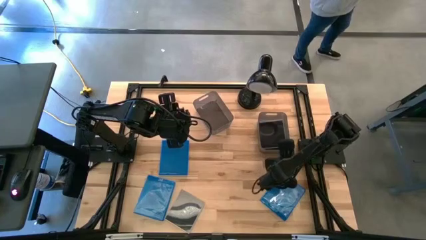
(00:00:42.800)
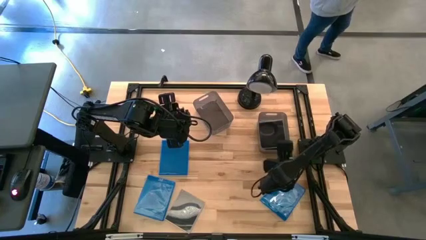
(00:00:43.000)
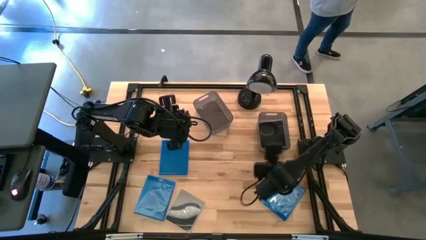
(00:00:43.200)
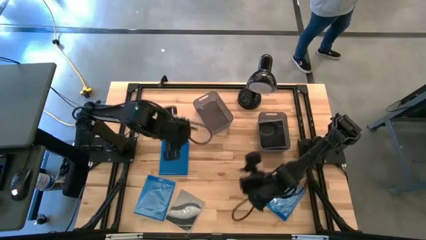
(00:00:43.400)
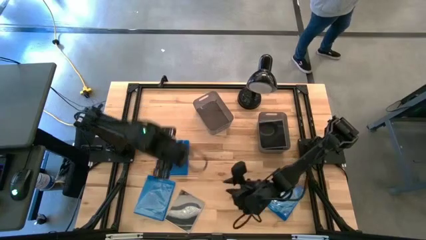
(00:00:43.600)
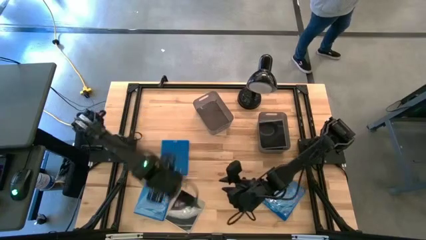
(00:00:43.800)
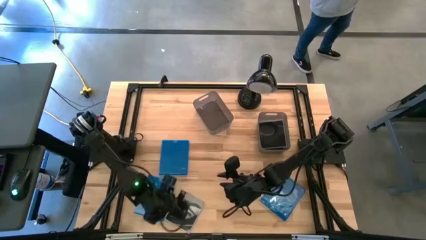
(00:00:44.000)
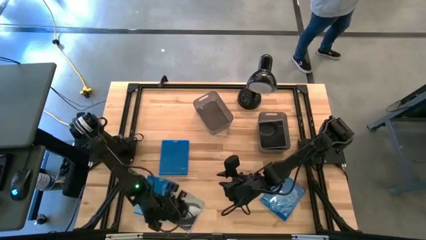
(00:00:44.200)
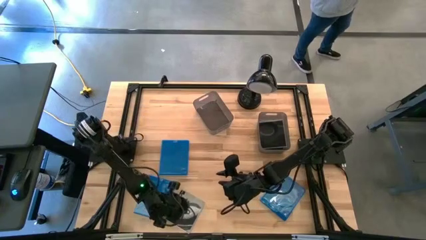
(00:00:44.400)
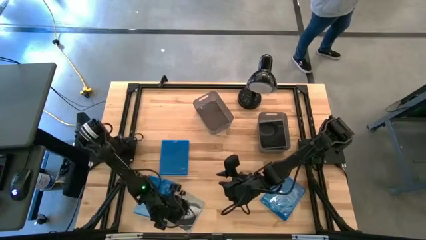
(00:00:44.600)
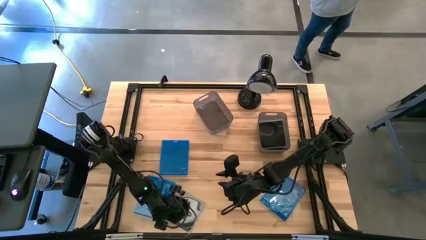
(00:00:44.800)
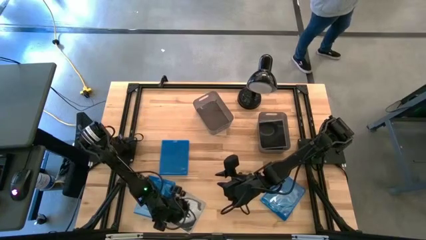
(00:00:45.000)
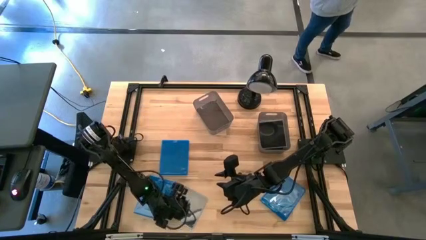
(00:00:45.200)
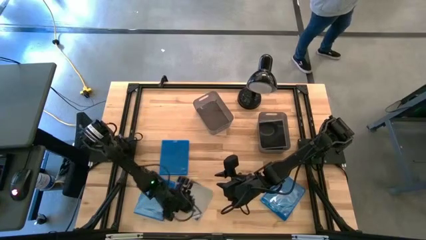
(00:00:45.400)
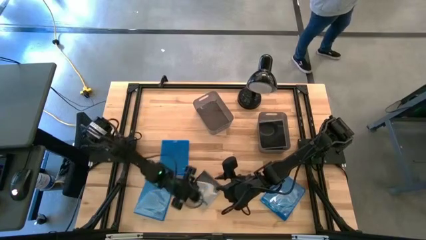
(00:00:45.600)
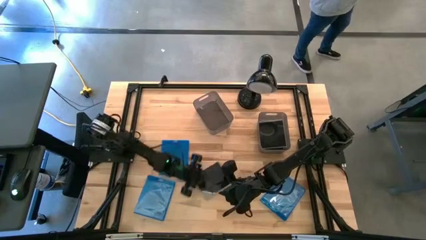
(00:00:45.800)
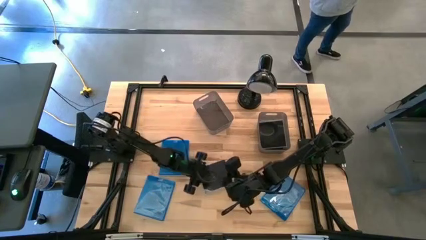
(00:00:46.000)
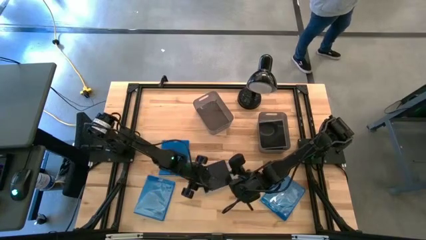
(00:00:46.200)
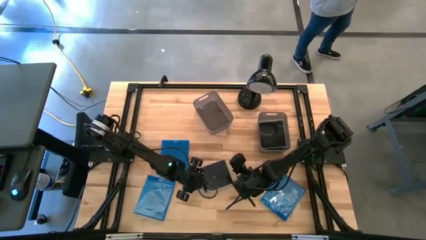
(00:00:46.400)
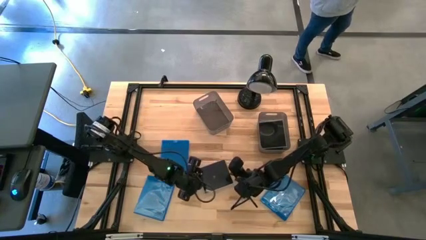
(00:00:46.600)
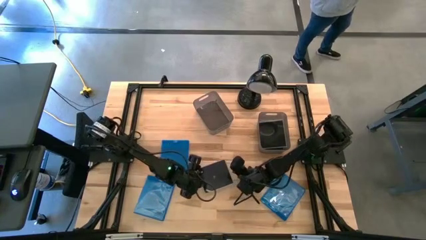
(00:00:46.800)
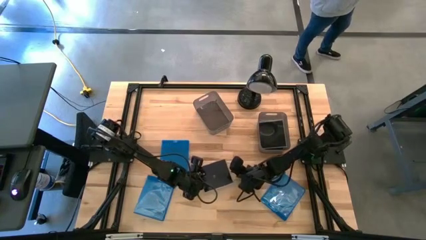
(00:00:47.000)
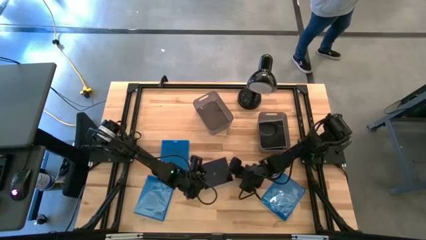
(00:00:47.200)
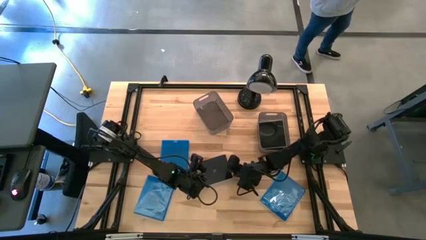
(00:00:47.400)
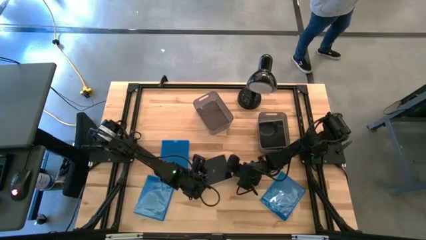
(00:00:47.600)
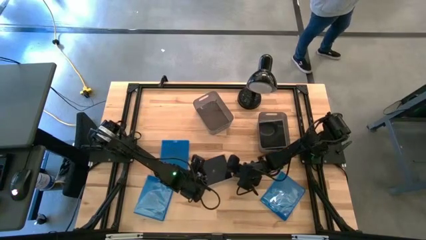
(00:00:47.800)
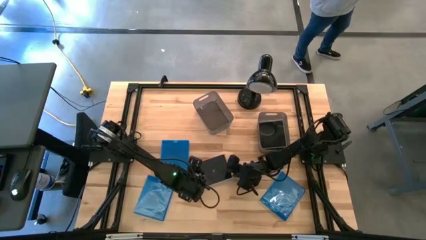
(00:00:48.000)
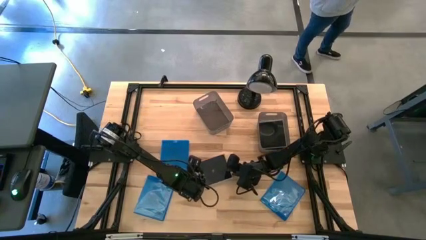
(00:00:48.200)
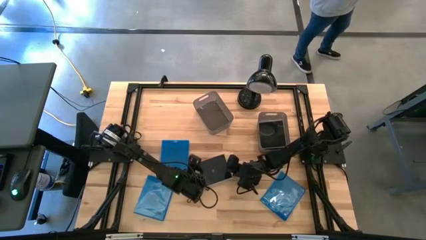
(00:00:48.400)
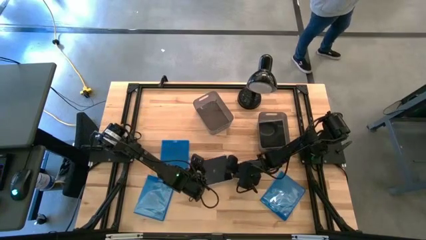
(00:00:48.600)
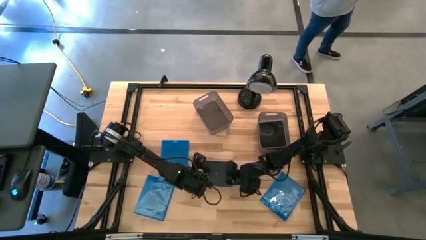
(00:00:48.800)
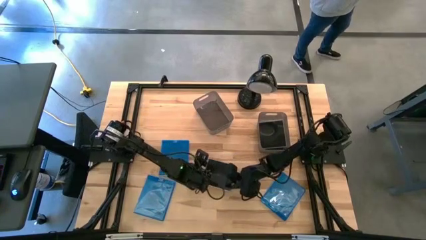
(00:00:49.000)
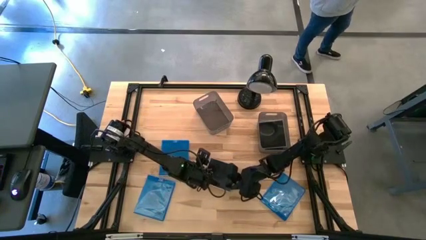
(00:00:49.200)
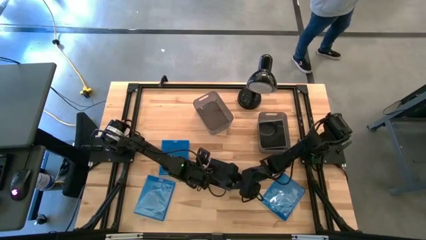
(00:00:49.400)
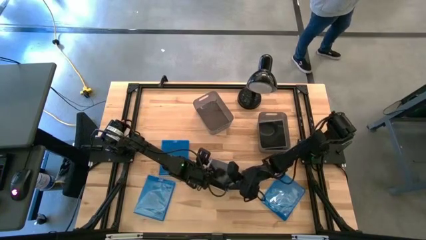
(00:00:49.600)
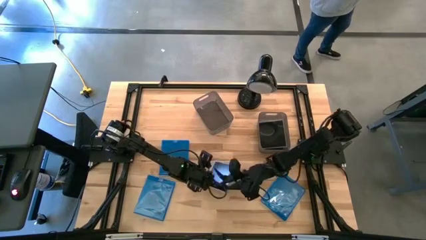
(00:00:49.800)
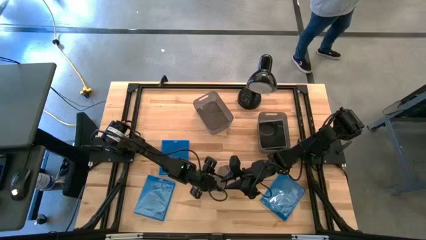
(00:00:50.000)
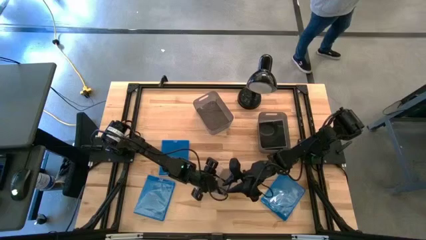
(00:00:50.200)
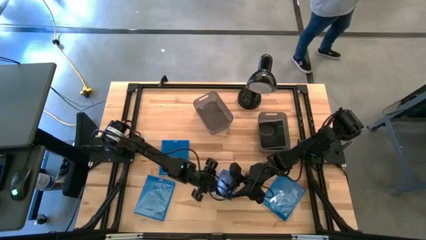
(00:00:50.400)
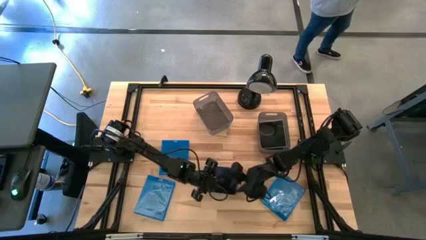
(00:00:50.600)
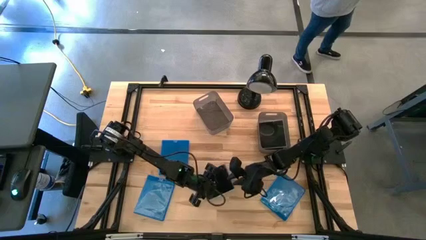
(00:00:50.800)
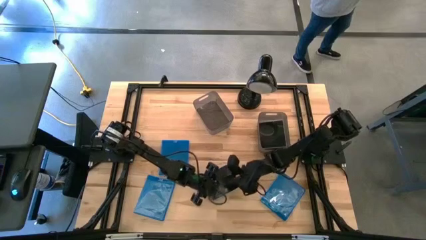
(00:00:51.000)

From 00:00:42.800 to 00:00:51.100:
Task: Pick & place jewel cases by type
Put the black CD case into the right black bin

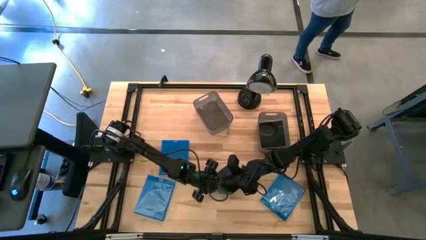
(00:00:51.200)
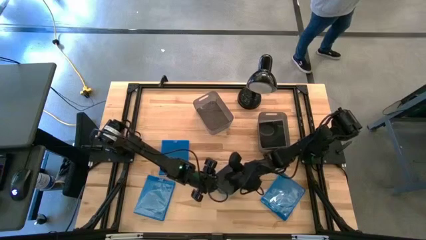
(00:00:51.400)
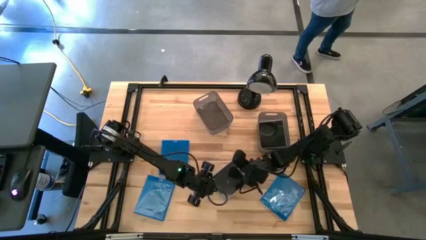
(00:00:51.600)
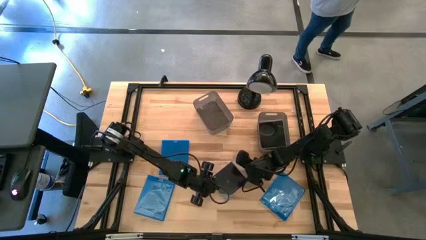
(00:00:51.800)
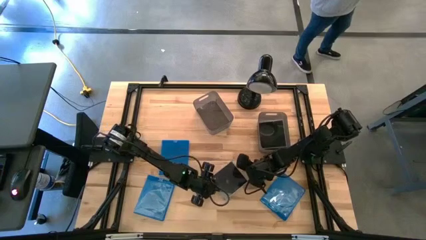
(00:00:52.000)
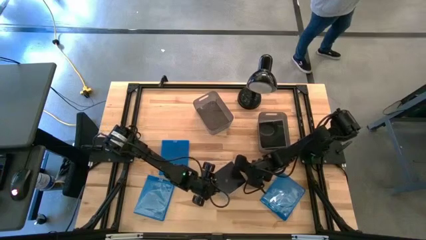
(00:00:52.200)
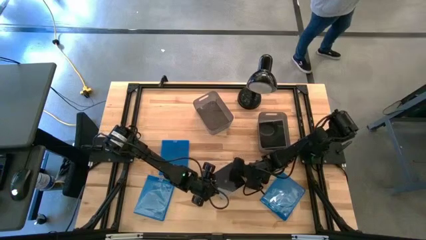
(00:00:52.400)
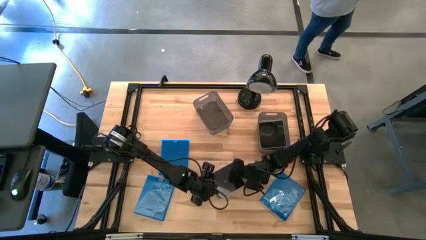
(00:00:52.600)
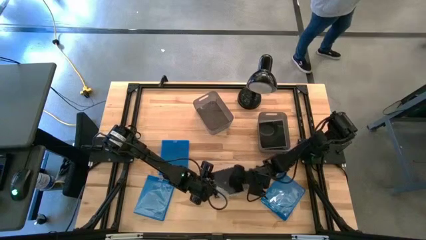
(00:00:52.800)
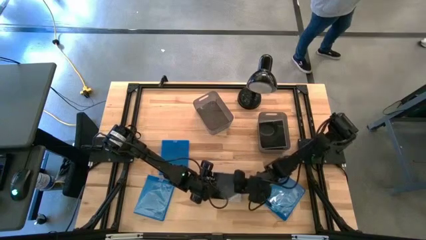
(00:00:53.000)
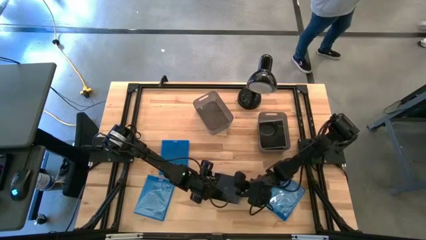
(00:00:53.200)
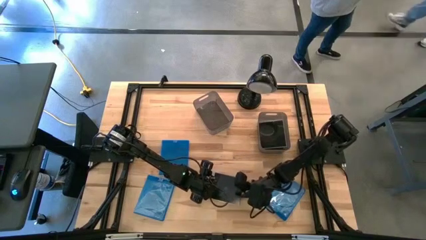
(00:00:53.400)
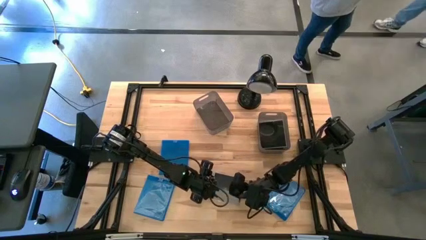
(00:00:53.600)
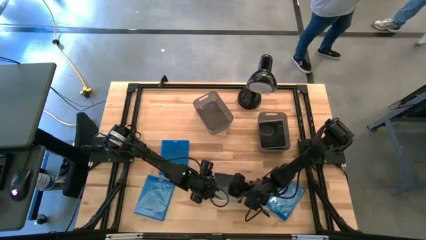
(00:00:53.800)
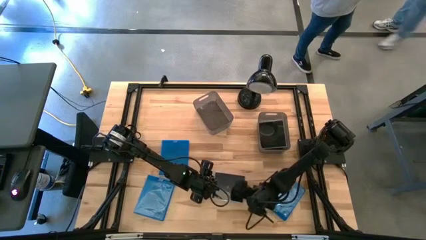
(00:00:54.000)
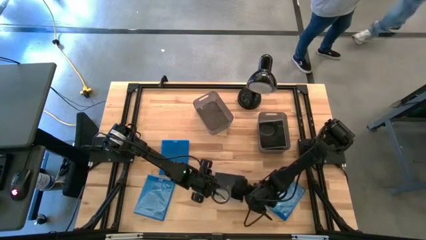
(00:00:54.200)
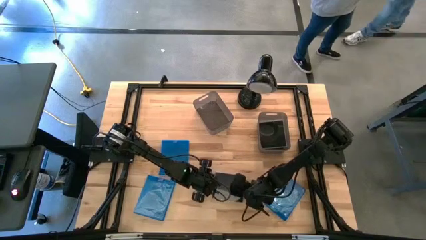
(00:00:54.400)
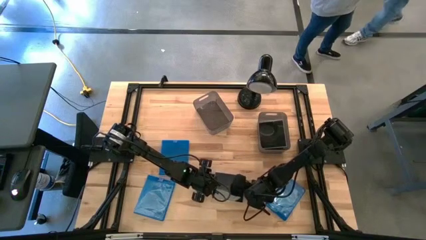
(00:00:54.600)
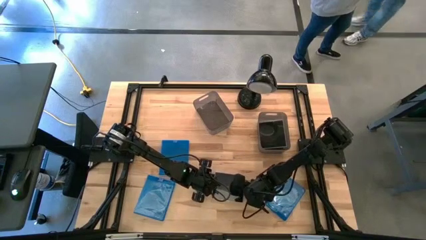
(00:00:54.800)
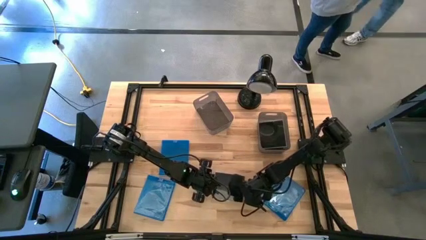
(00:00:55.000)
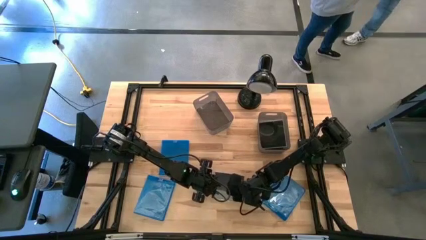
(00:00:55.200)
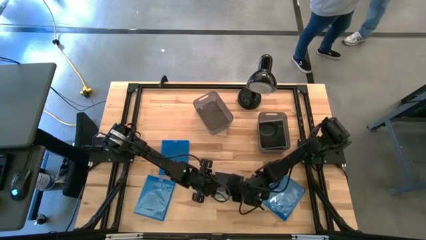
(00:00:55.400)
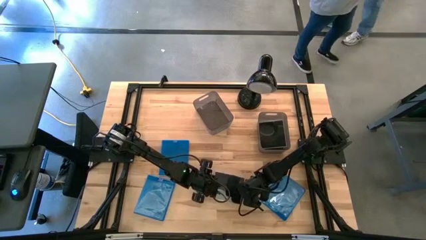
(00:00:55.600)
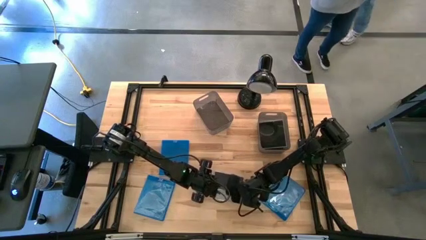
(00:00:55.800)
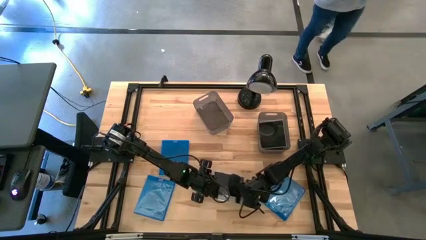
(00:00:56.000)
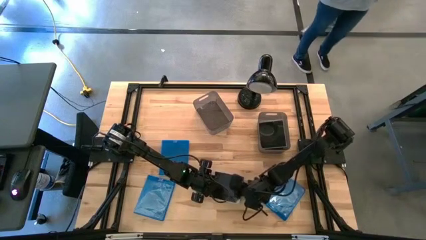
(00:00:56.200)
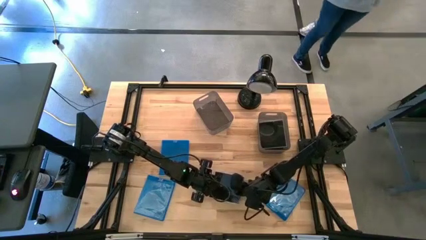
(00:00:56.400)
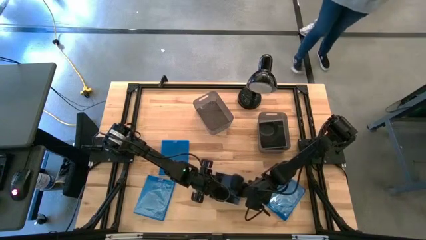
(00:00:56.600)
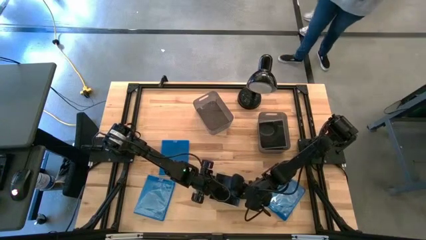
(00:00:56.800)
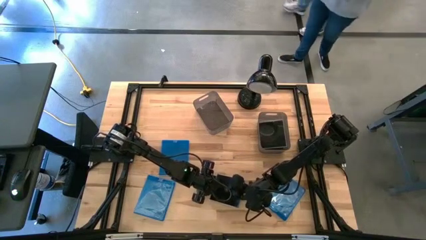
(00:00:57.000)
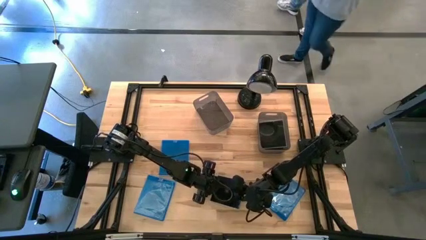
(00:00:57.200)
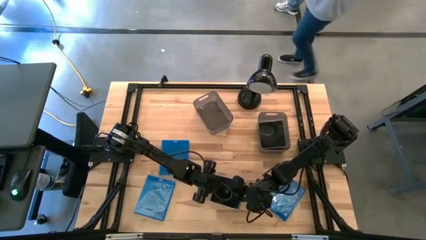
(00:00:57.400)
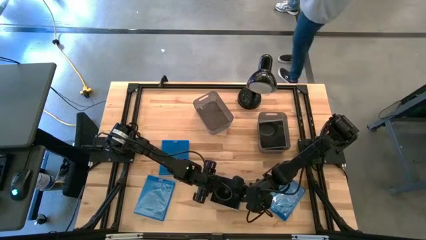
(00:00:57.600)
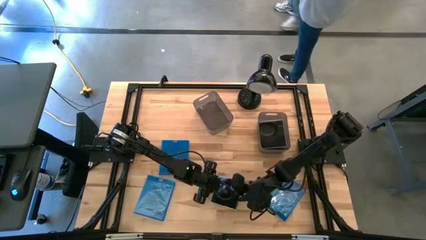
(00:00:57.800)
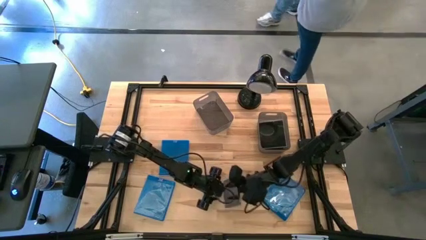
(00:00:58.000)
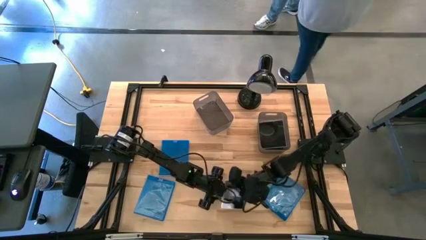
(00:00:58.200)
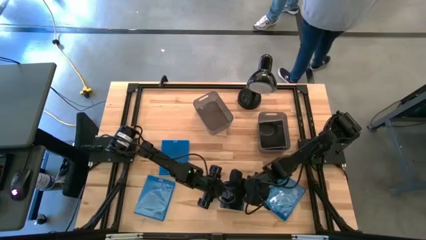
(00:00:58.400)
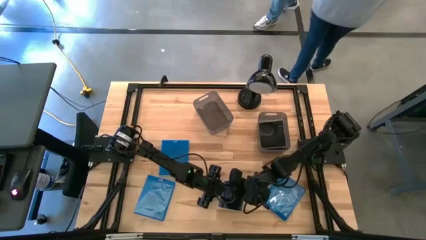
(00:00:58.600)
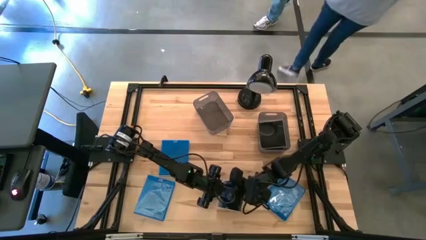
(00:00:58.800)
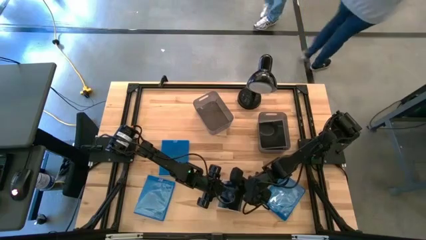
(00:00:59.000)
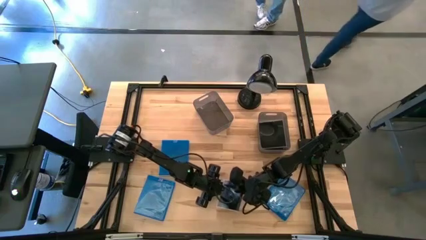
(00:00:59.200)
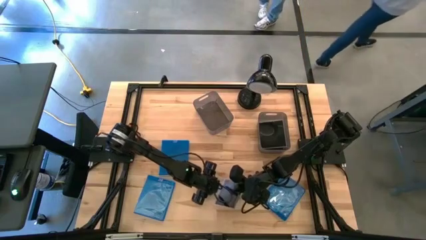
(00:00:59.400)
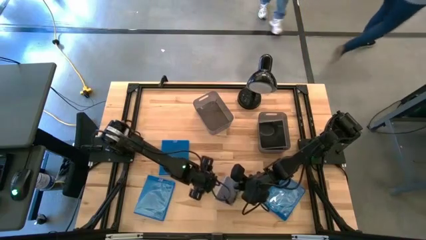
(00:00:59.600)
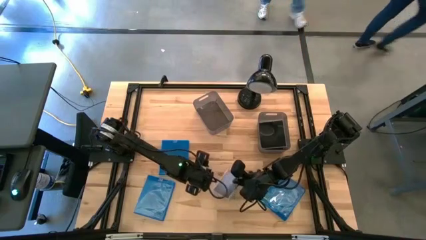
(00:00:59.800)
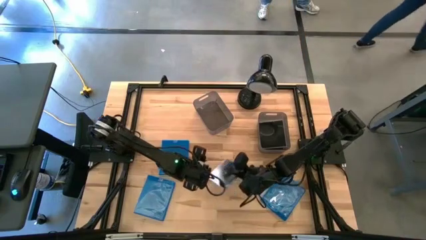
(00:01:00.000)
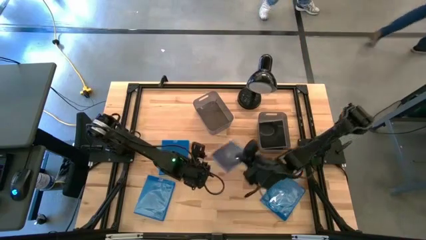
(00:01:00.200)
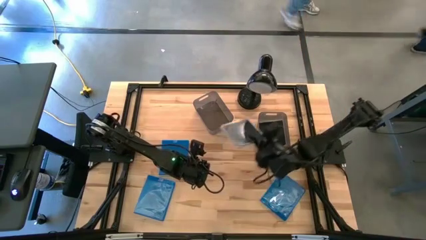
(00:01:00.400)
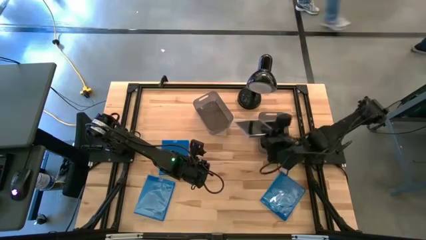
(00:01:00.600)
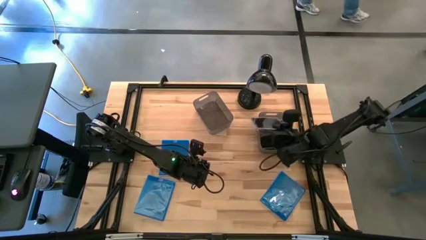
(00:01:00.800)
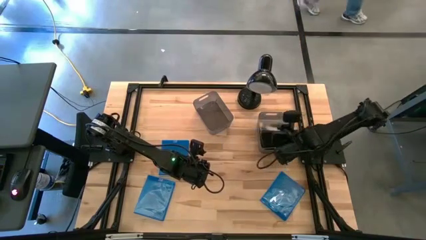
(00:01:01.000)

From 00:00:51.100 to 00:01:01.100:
Put the black CD case into the right black bin
